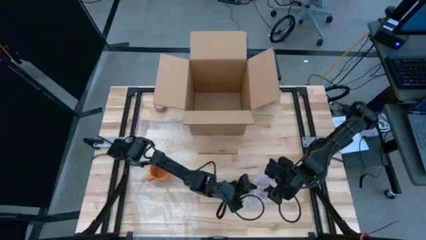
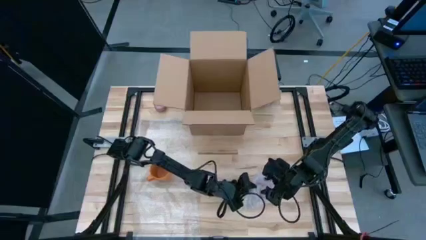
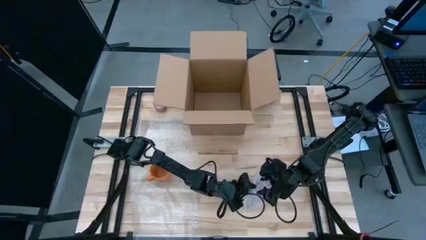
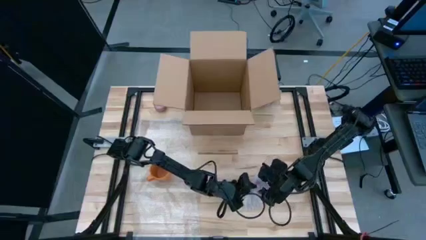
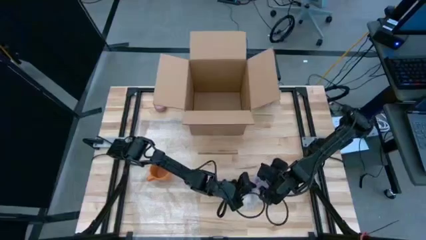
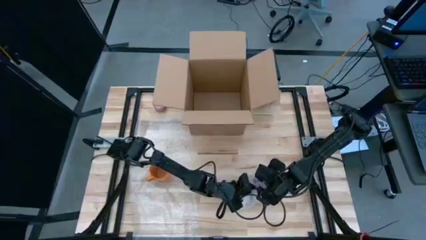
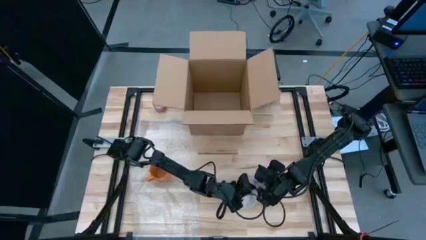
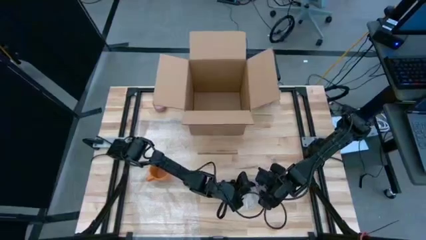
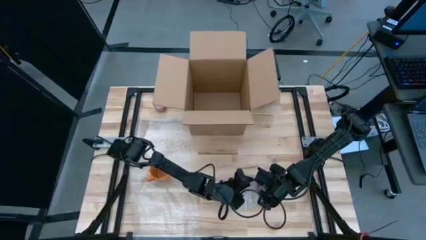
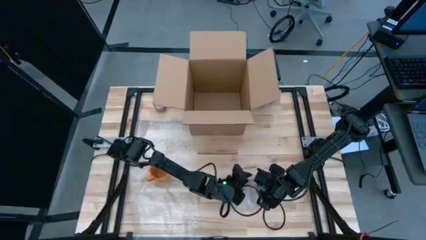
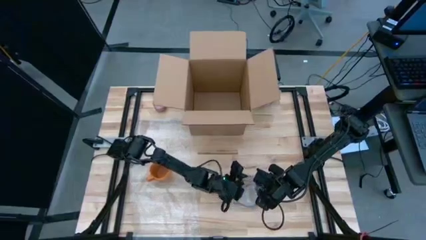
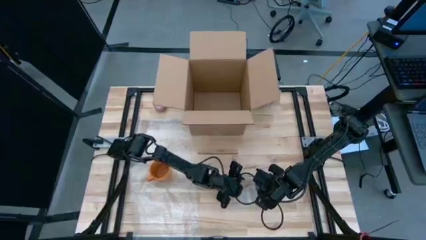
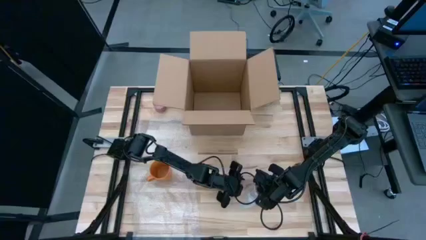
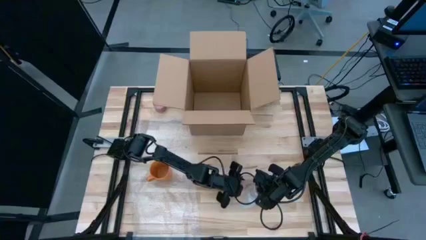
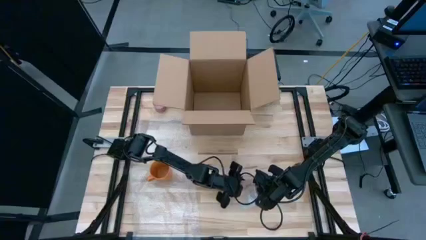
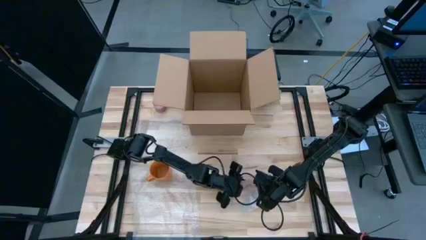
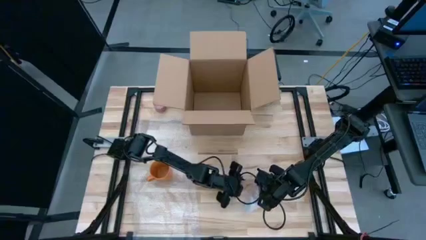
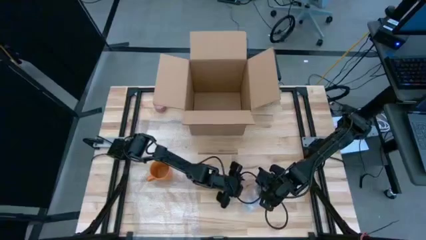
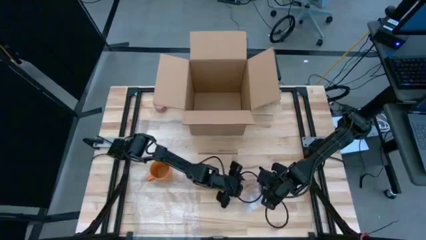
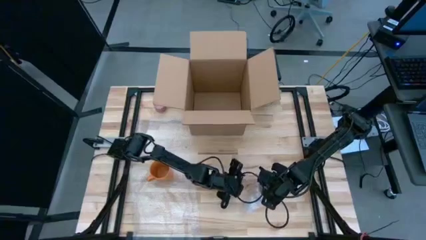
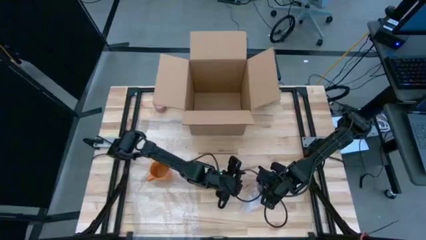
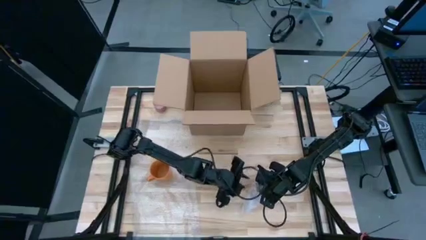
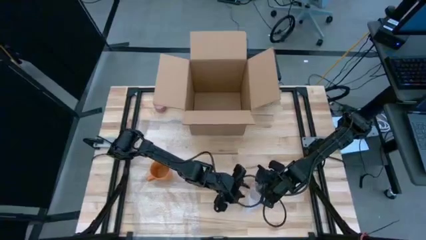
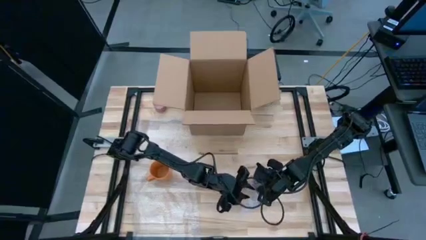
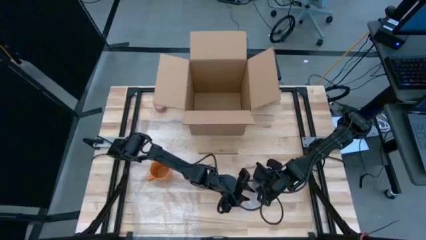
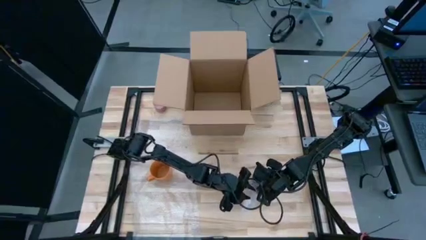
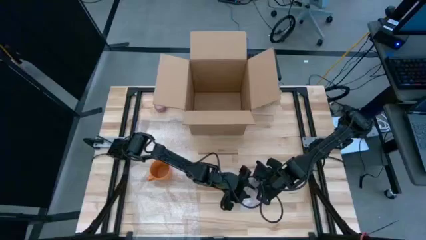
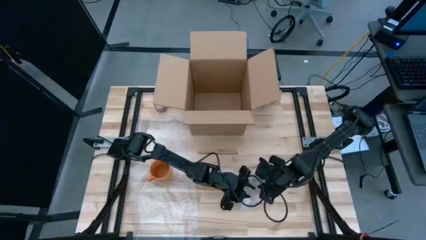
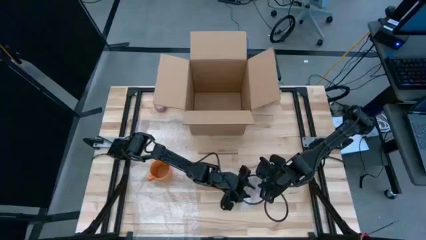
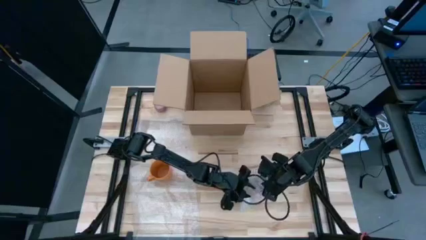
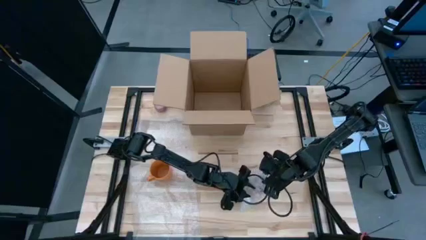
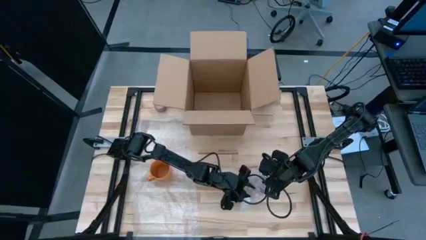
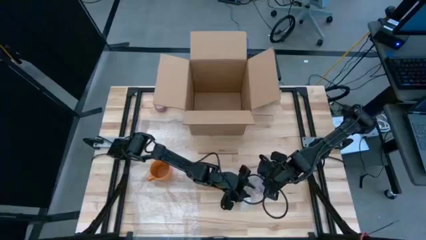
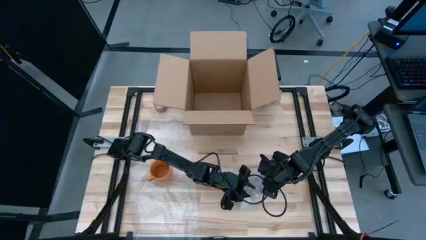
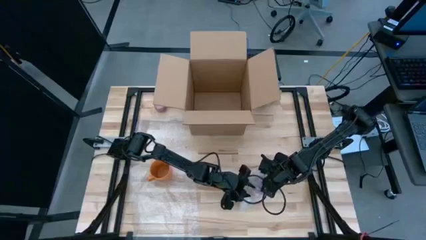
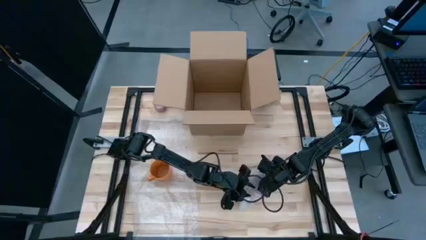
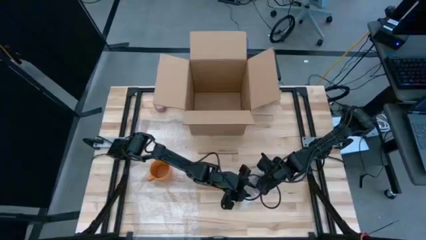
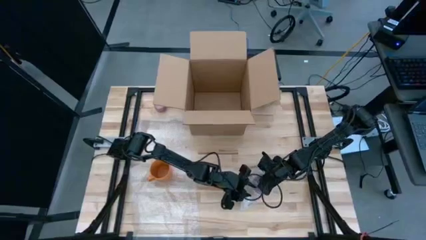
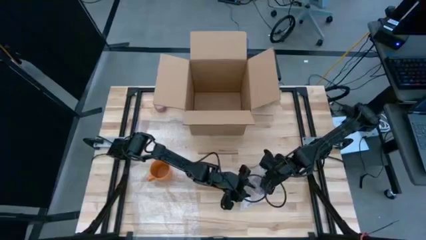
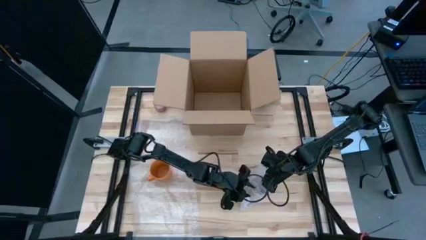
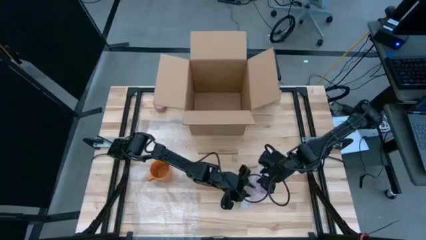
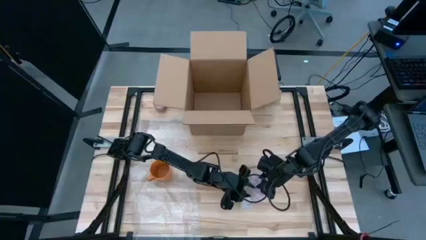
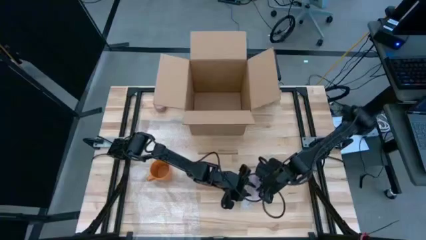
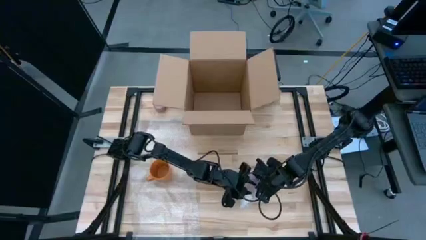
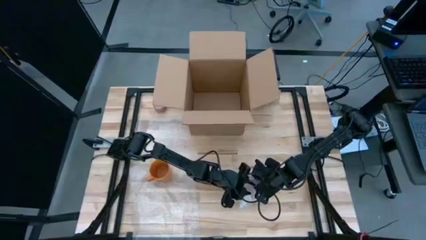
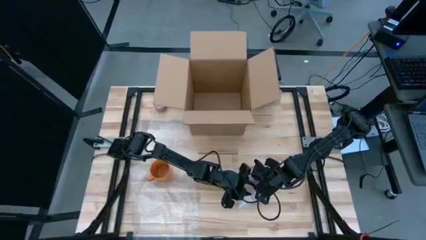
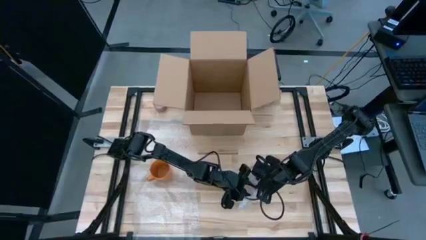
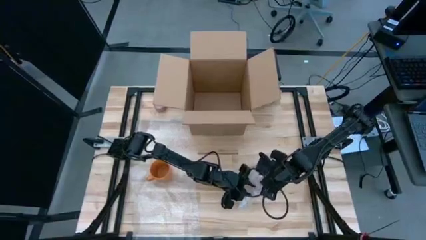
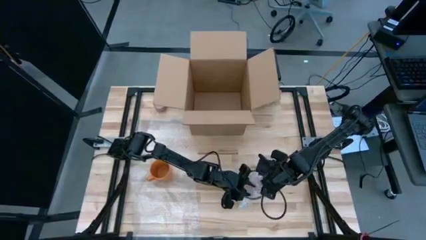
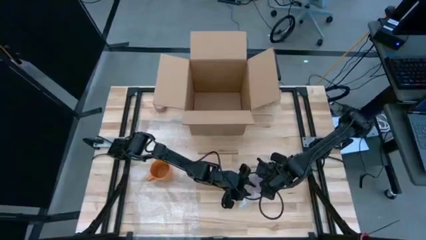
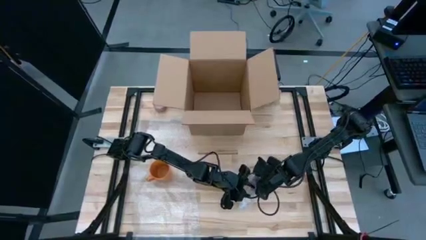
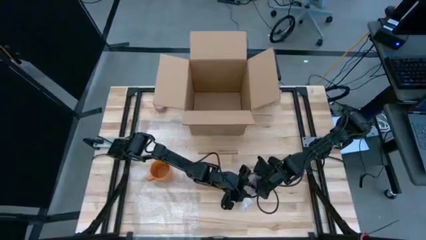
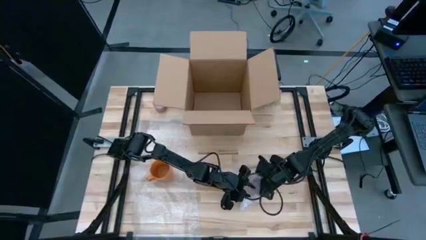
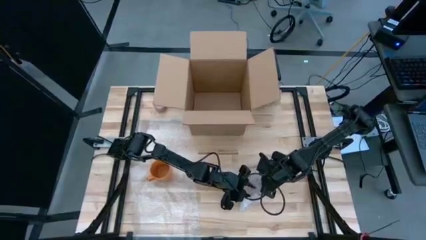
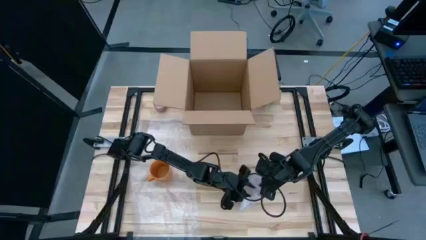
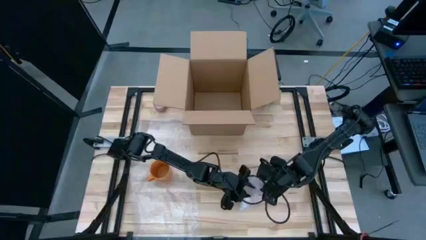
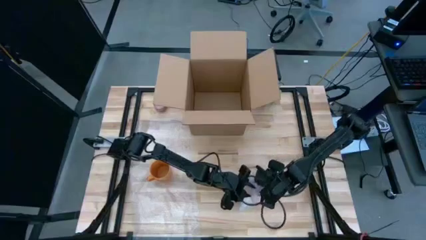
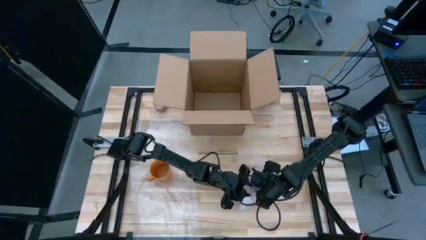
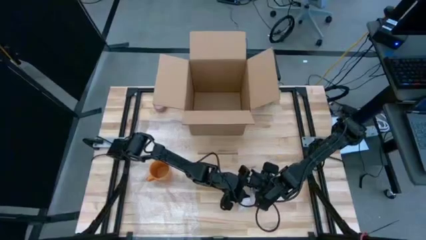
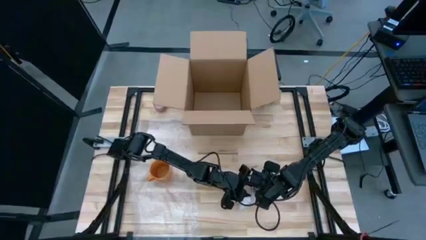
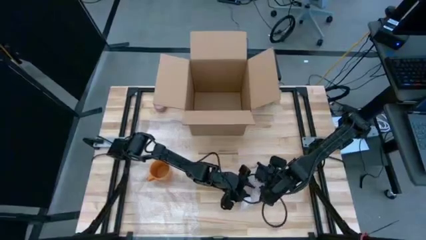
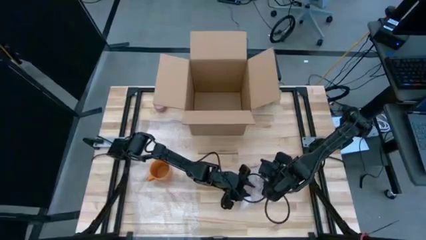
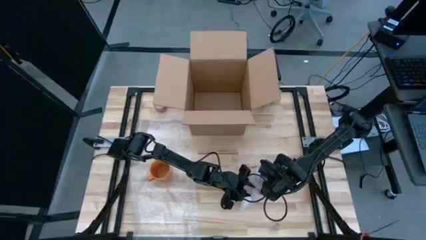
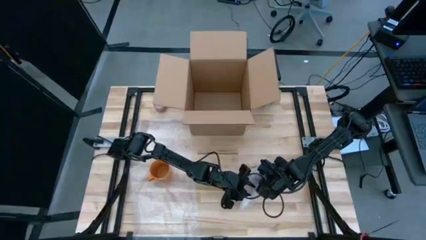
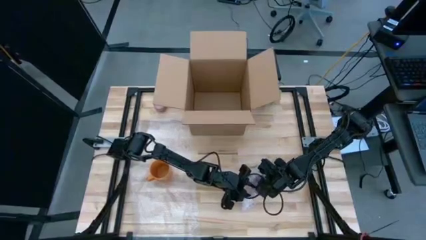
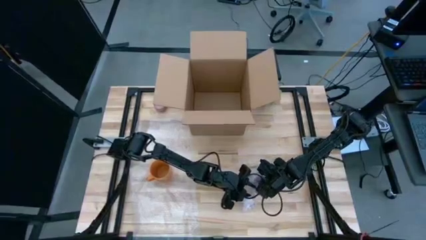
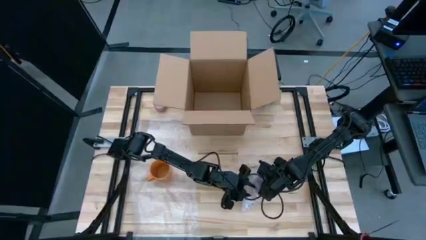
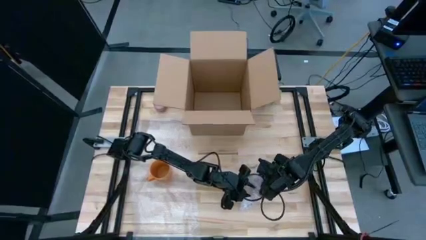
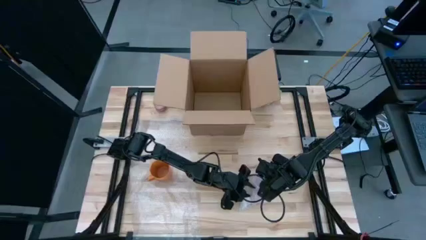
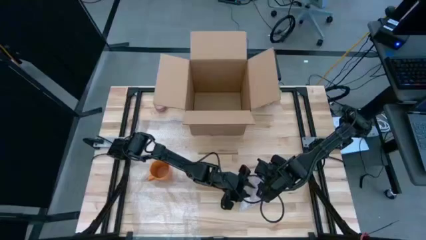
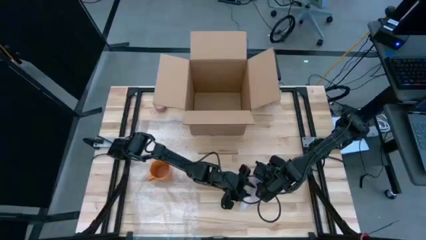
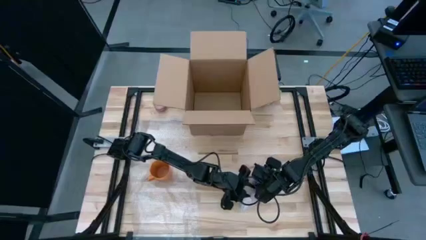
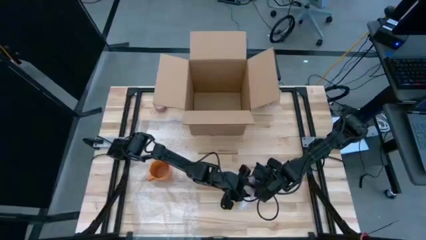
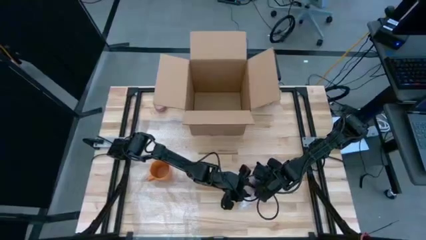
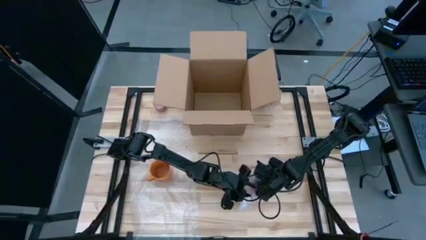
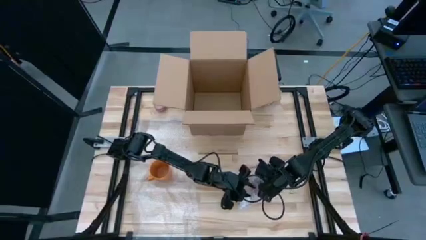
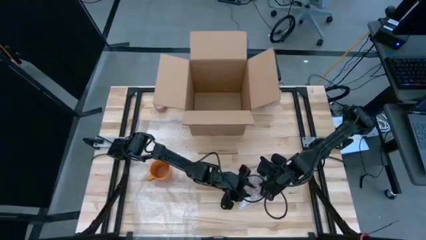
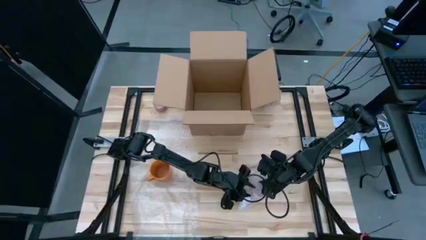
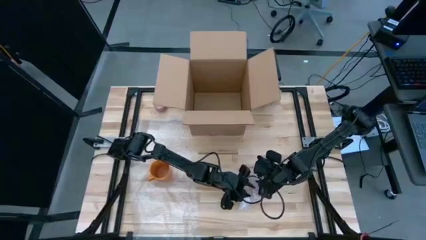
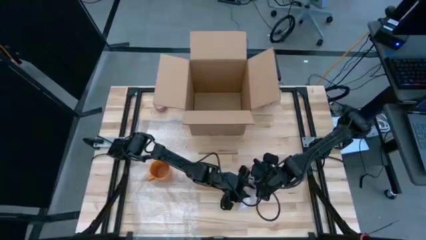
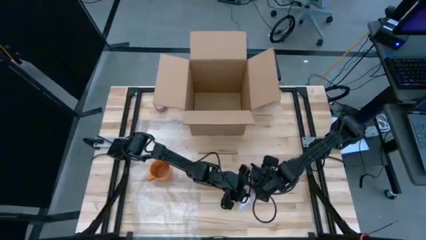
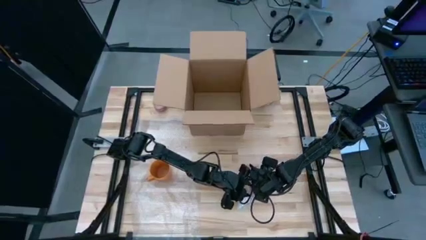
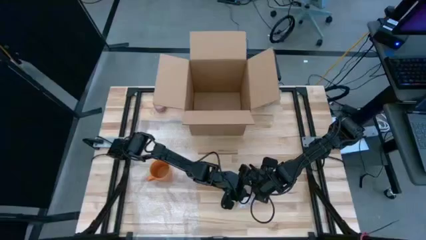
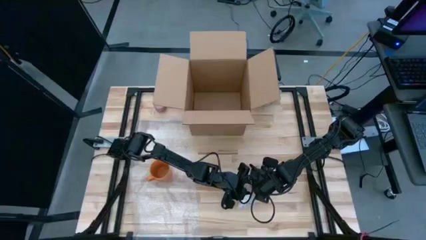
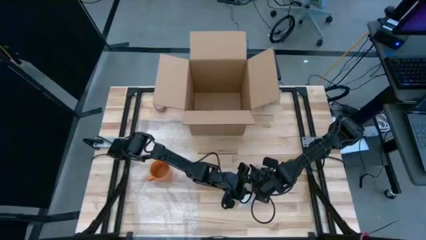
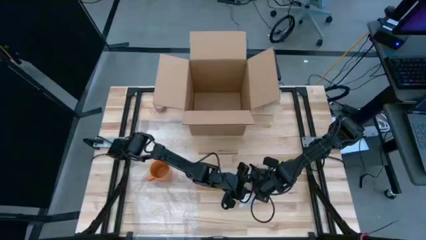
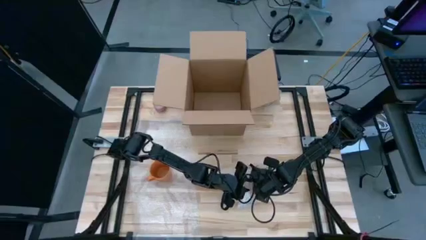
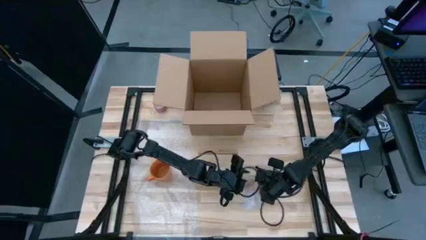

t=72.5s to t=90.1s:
Task: wrap mug
Wrap the pink cup with bubble wrap
